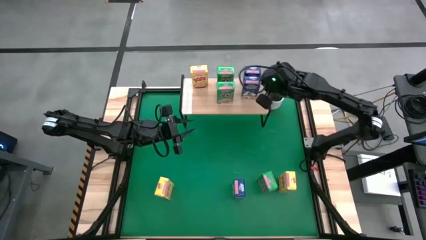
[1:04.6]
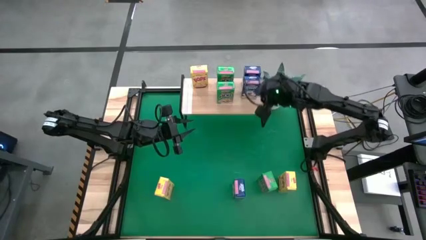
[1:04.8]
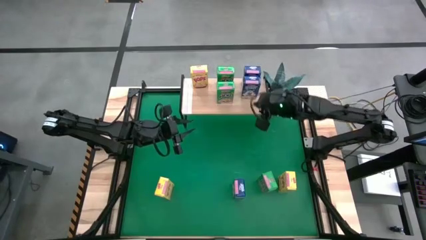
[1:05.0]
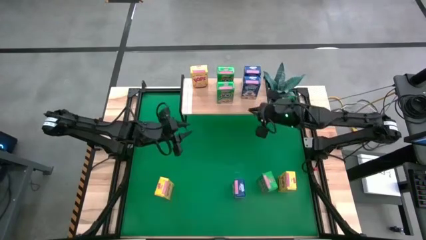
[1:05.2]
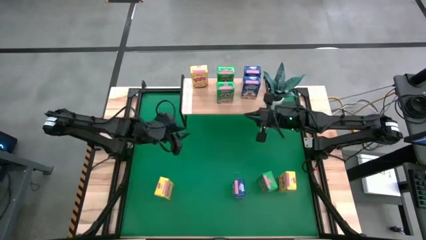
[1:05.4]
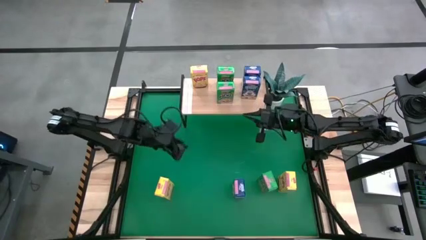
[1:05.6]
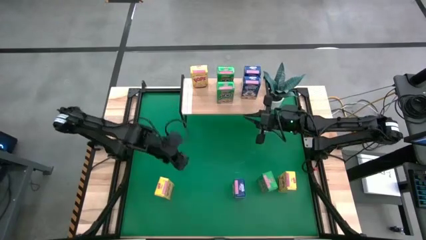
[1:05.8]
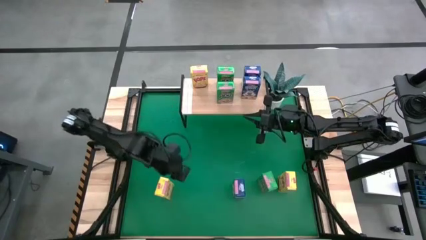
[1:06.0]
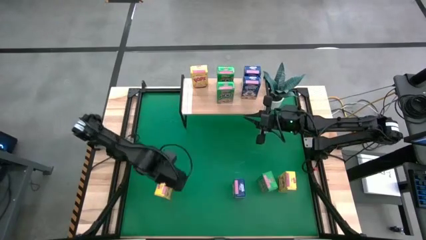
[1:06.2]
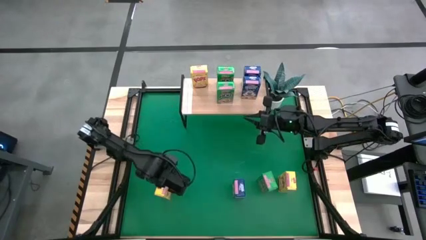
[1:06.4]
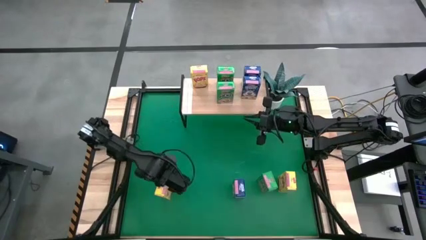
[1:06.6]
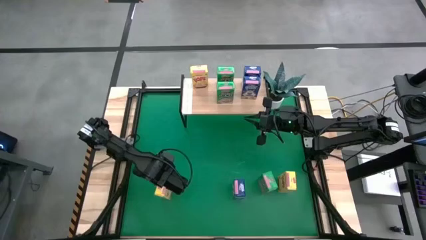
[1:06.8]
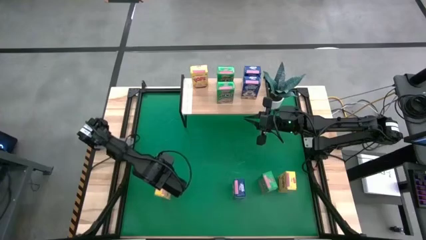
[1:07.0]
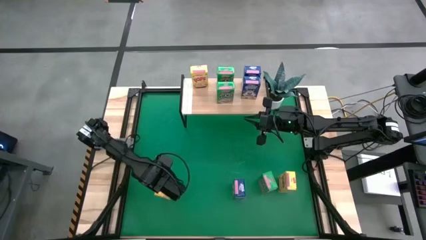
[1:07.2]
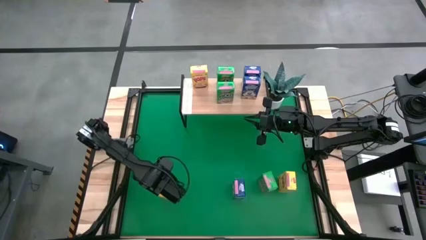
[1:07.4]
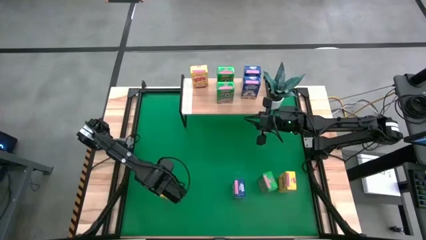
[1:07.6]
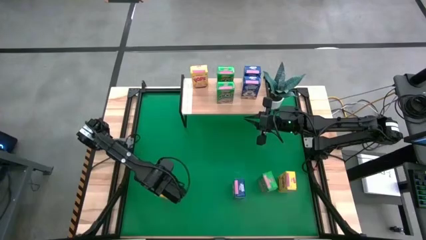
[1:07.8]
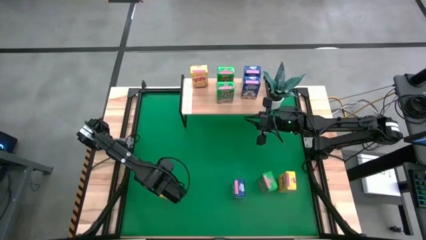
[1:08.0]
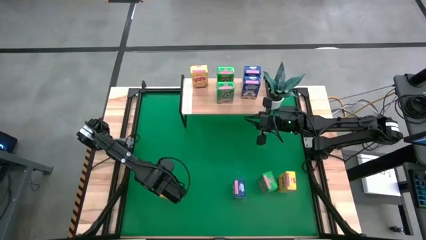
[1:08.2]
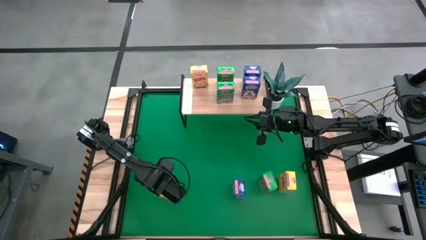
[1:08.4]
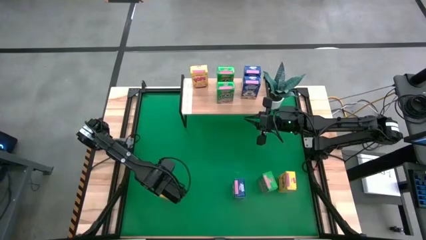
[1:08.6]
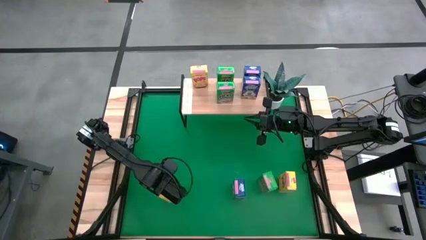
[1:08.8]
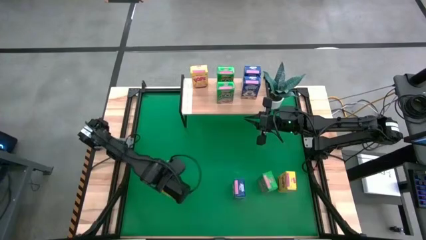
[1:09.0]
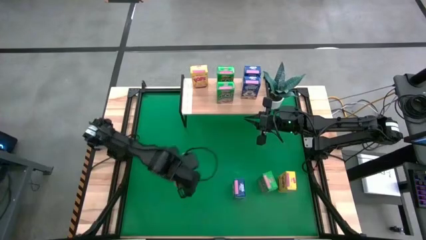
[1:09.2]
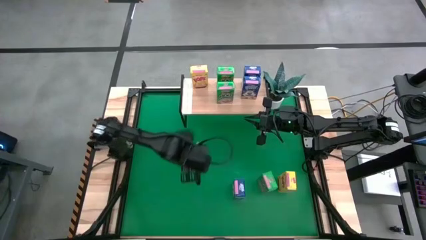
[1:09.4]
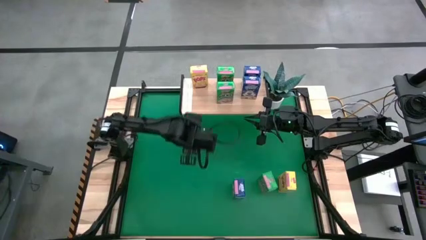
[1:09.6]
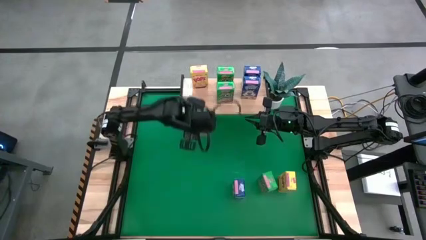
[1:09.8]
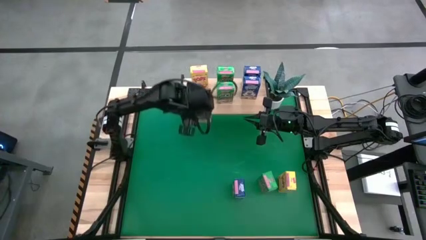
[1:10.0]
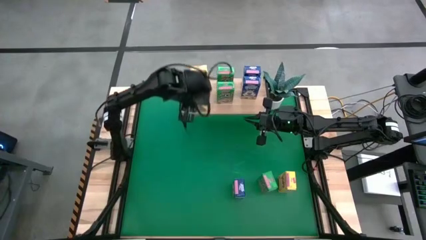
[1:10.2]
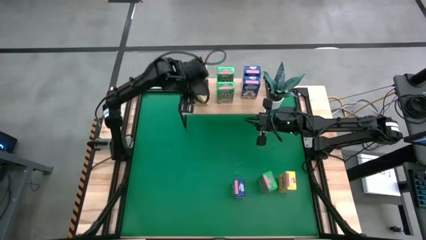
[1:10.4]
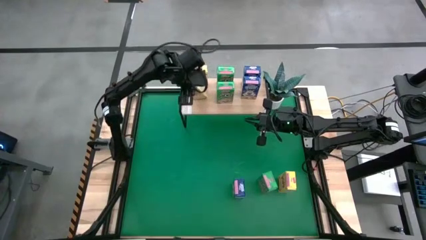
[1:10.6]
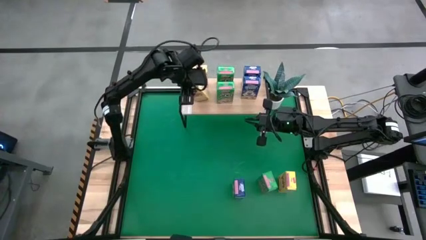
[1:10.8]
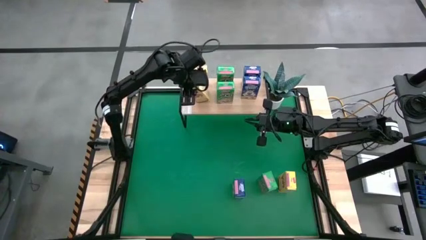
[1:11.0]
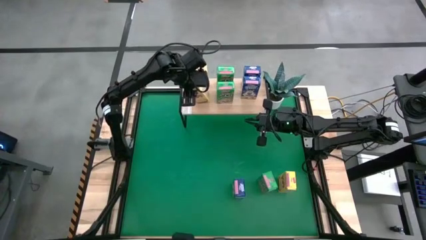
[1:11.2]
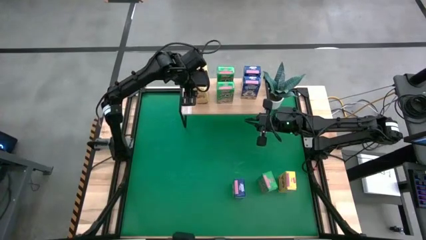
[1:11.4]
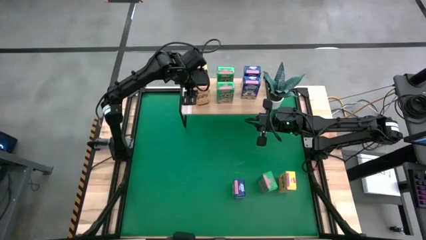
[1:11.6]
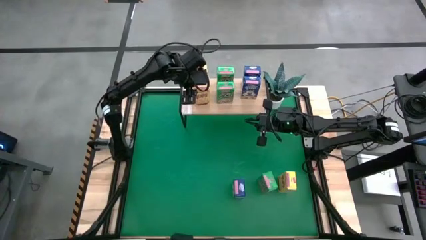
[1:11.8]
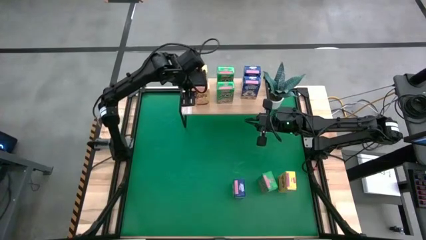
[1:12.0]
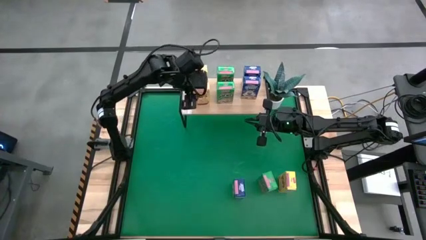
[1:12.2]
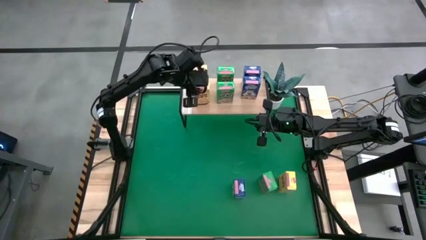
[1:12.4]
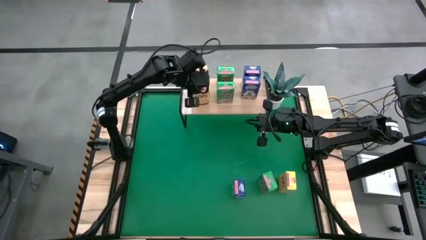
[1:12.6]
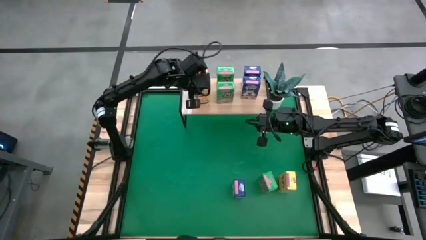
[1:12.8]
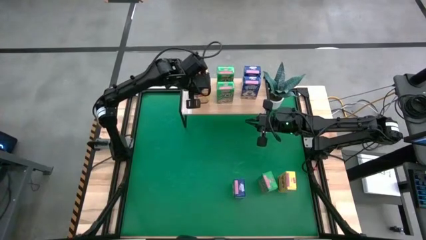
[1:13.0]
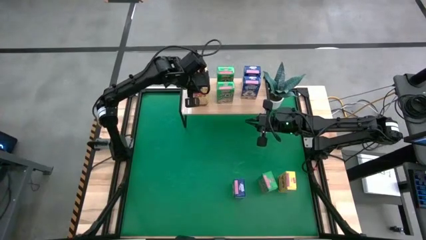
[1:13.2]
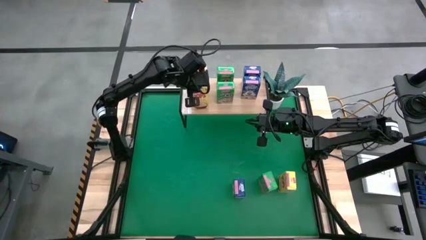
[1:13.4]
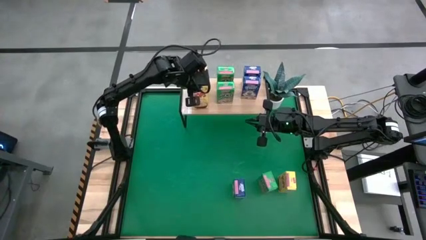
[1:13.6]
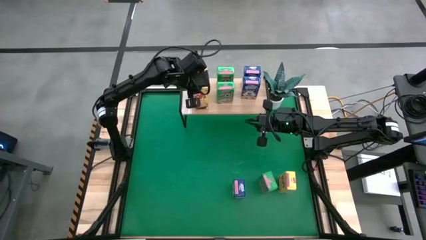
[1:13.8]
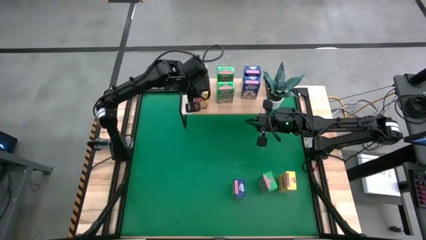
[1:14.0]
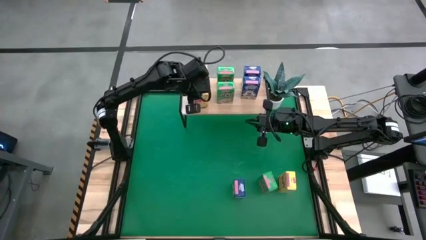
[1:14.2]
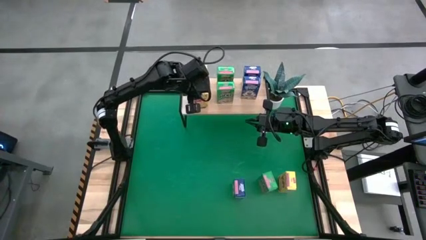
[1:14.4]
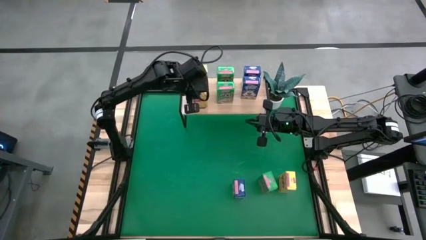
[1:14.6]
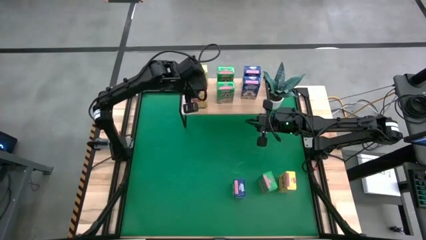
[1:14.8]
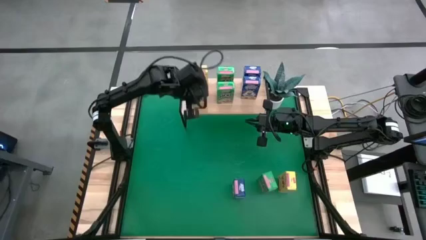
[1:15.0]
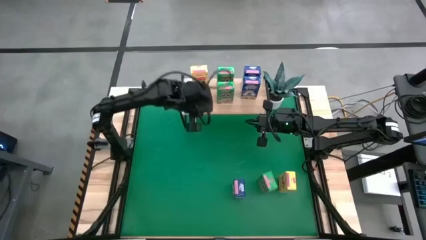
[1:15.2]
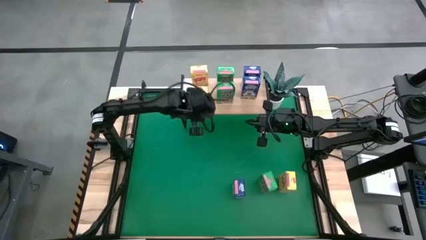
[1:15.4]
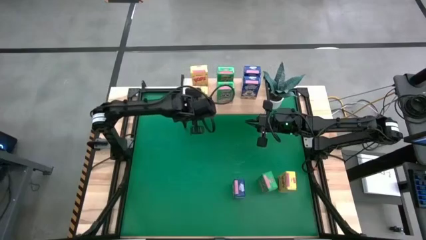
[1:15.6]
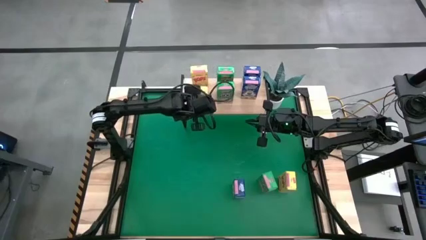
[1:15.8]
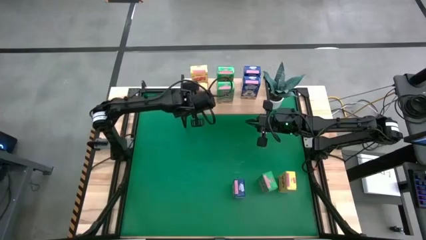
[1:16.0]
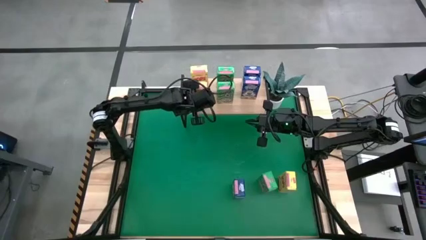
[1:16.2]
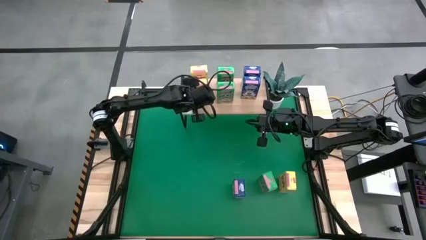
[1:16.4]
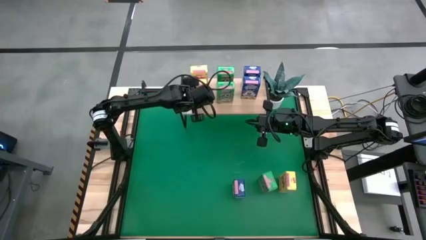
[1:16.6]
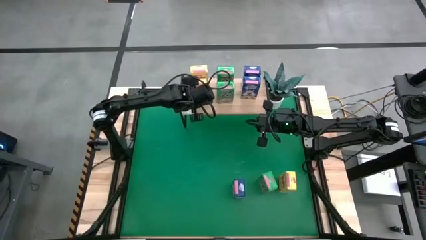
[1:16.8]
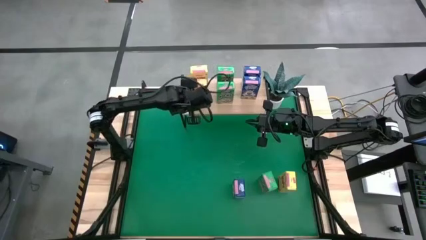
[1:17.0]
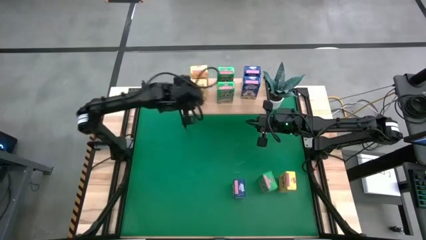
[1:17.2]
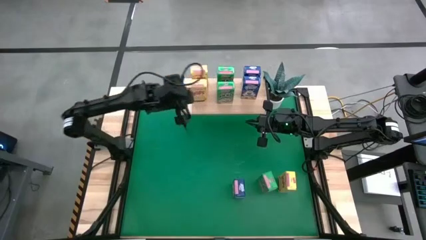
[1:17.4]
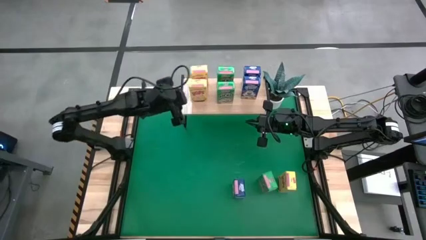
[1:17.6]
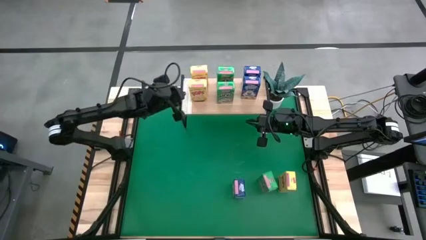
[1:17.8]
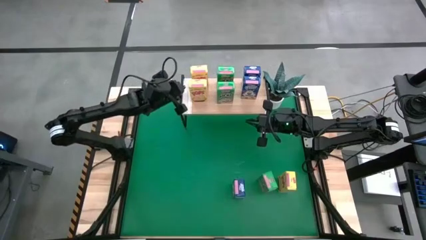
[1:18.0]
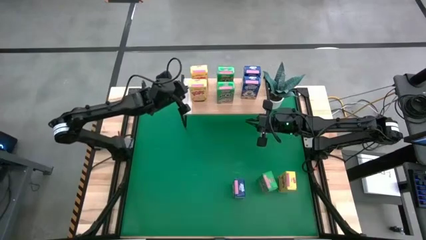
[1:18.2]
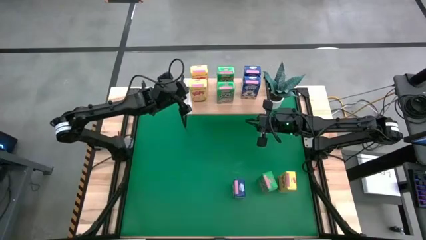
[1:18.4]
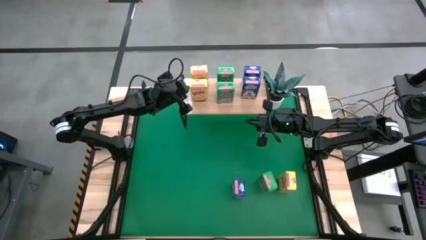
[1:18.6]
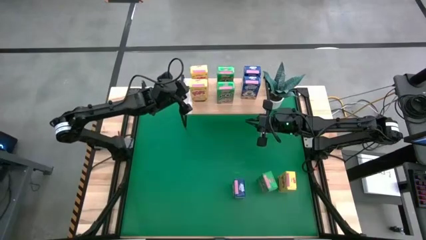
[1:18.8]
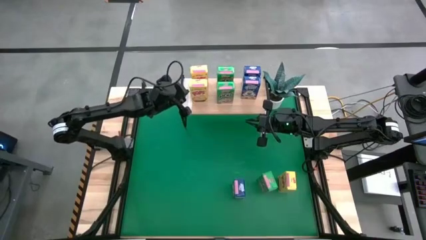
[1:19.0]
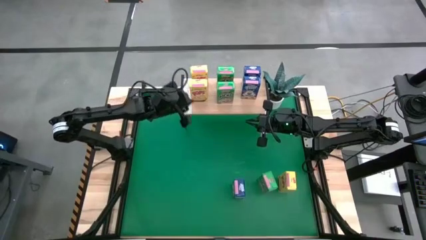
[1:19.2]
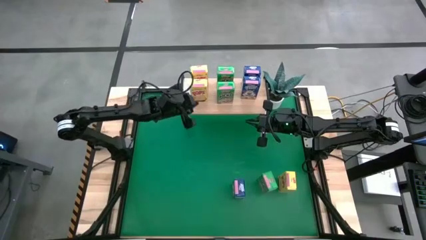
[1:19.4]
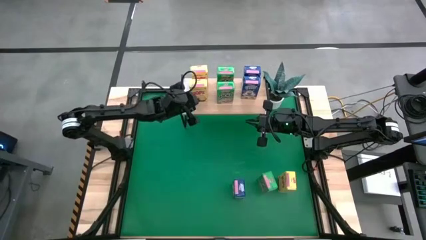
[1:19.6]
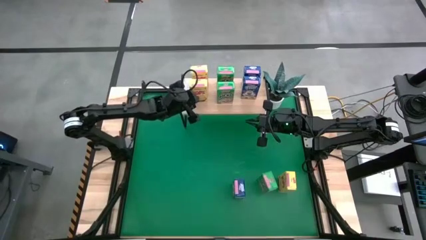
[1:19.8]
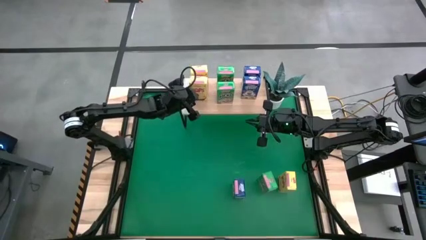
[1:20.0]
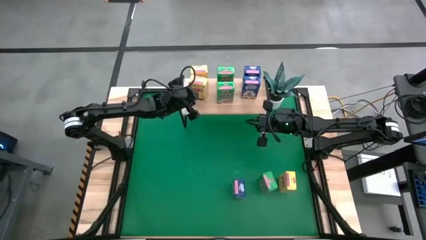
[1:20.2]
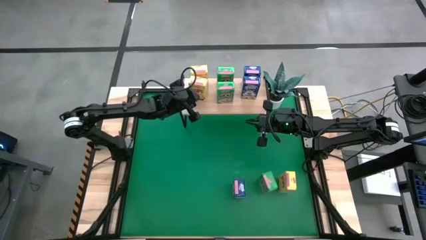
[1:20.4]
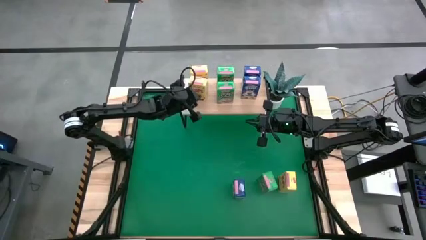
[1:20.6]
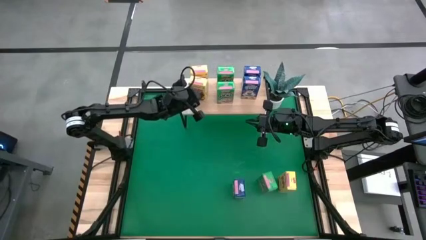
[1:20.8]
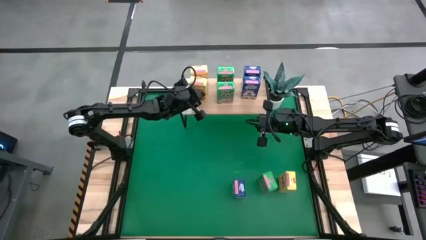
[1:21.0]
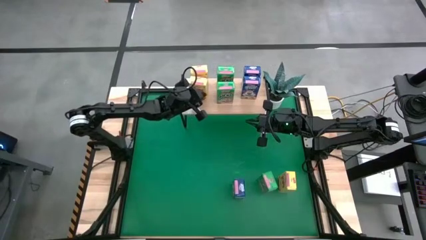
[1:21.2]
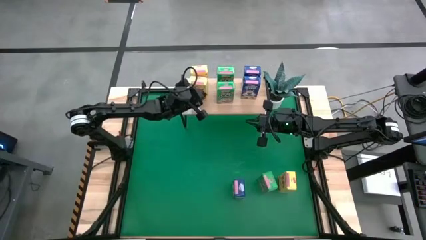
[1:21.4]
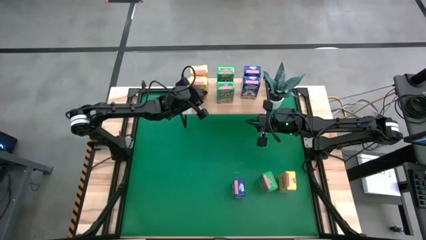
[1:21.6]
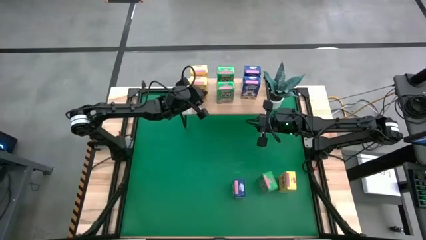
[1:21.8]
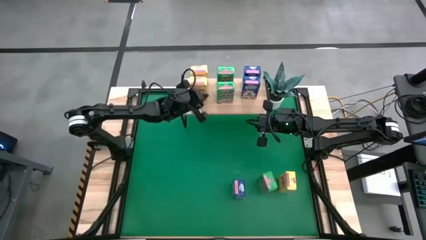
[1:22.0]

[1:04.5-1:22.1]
Task: Stack cereal on shelf
Put the left yellow cereal box on the shelf aligned with the other yellow cereal box
